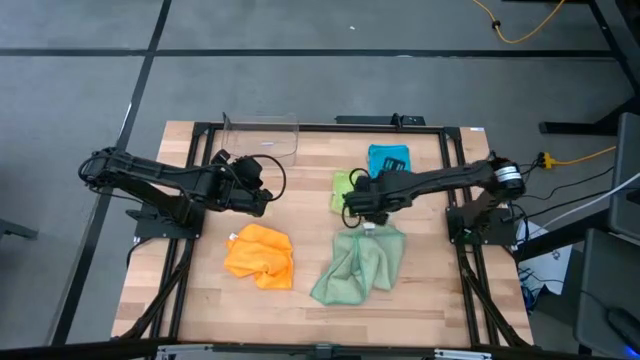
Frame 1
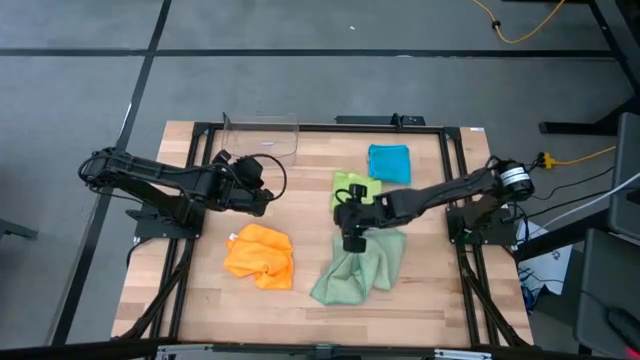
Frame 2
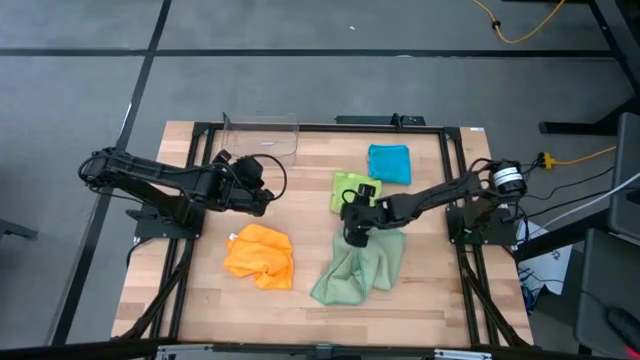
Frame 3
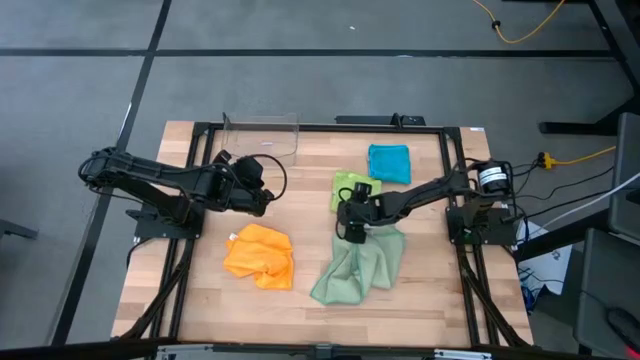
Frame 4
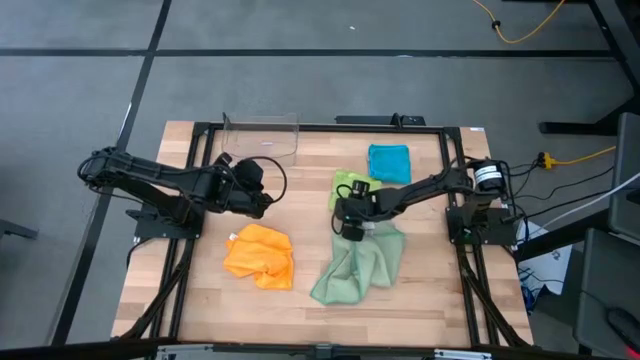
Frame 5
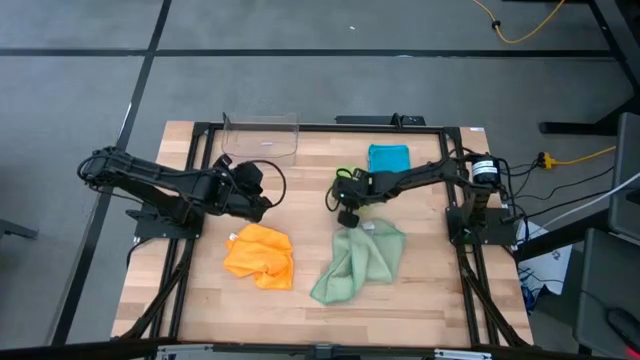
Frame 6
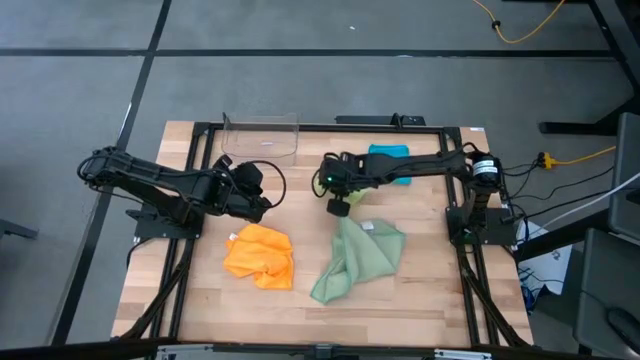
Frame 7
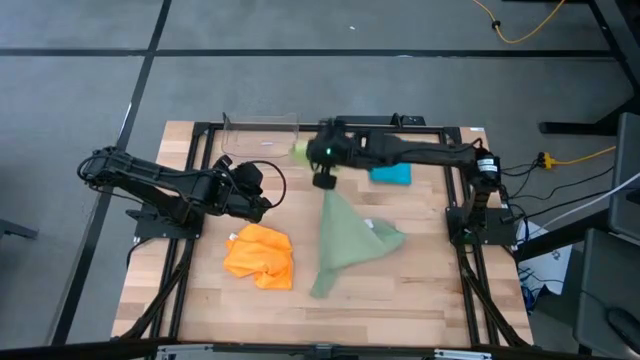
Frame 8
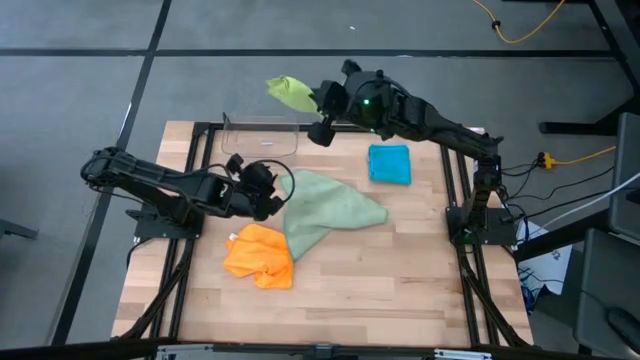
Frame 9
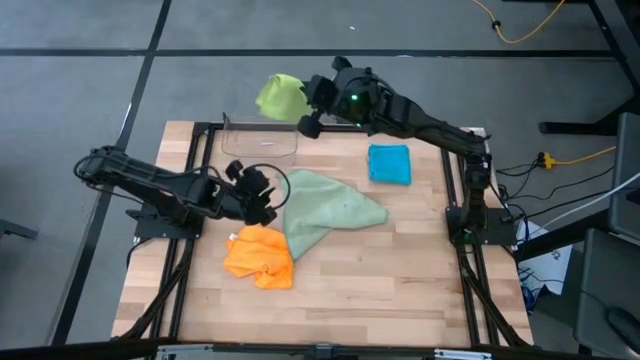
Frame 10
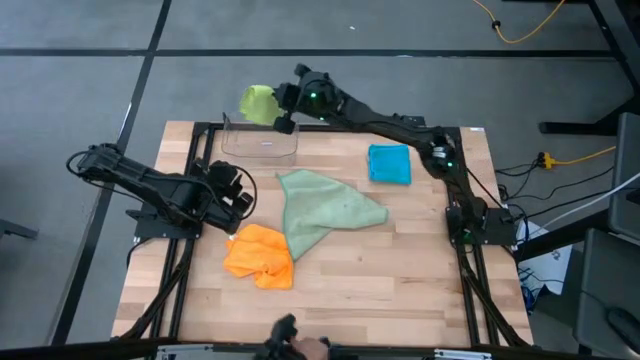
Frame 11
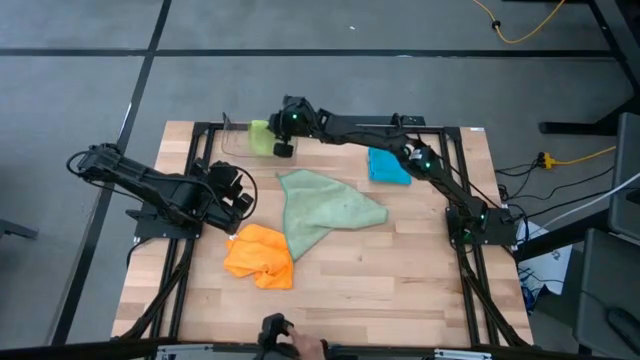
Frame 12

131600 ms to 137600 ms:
Task: Fold microfiber towels
Put the light green towel into the transparent bin

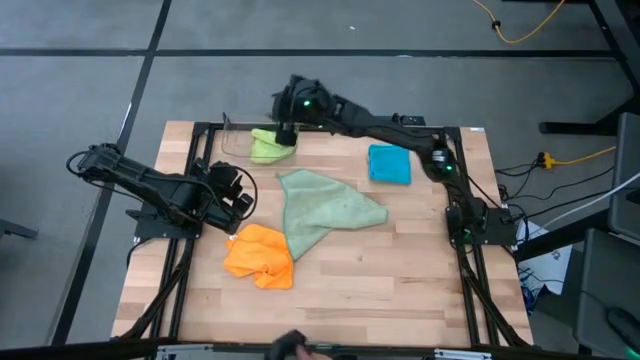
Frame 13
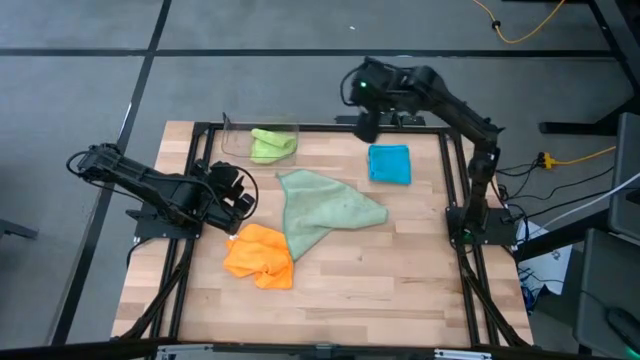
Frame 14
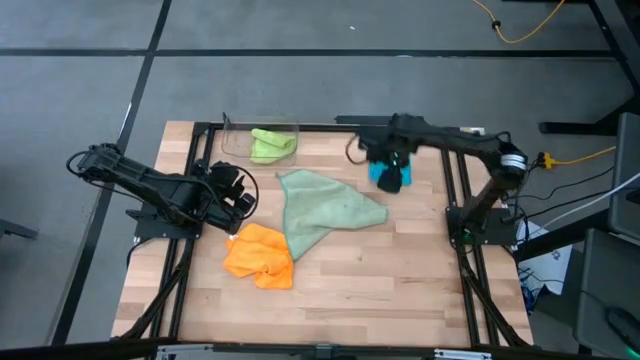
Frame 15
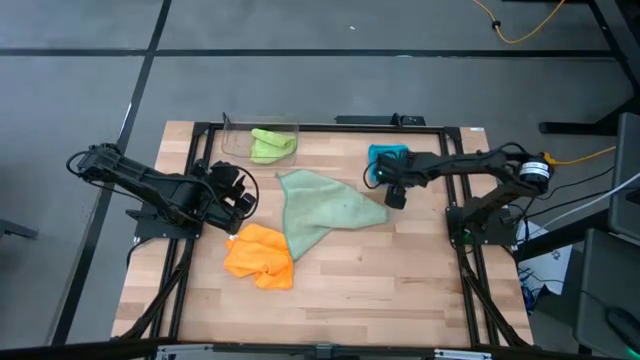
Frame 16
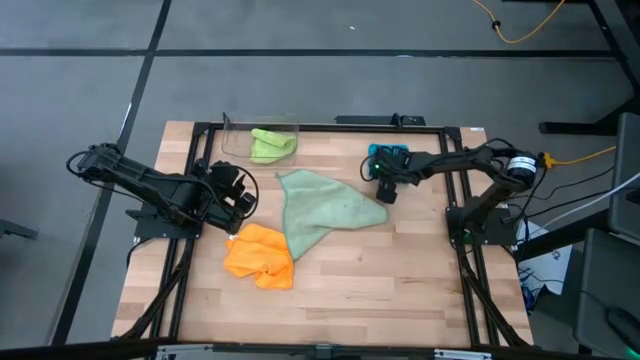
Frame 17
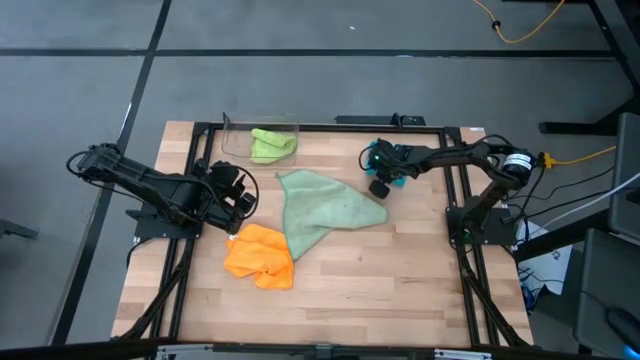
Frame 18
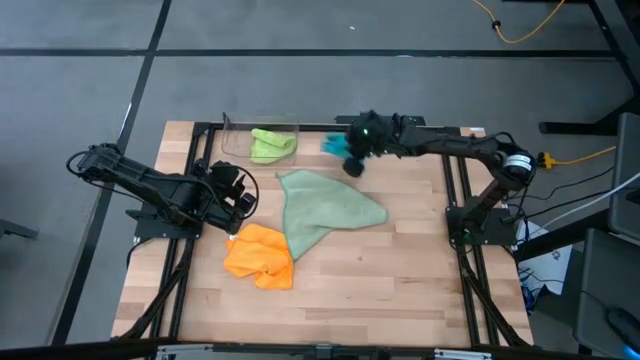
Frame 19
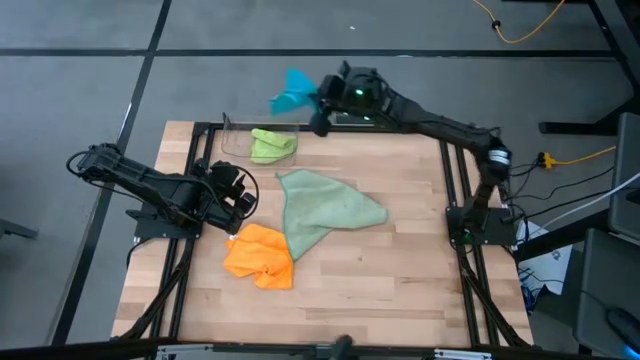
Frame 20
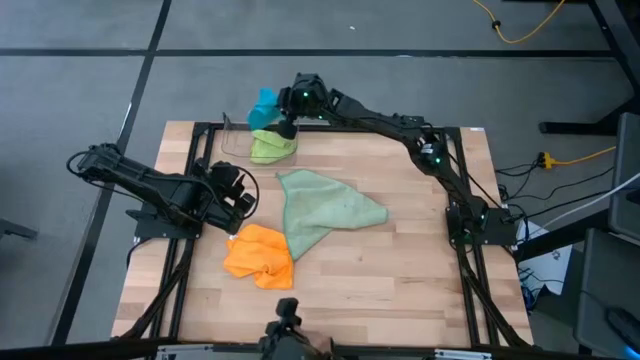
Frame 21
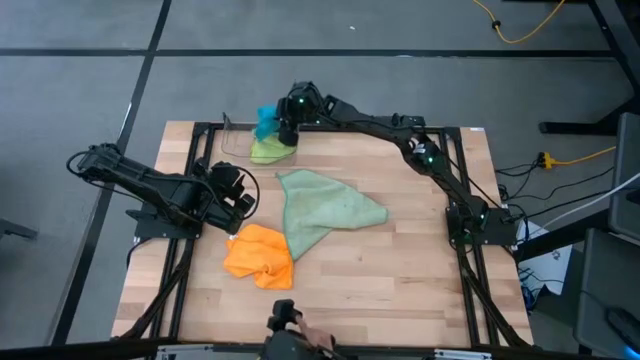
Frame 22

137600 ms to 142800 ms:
Put the blue towel into the transparent bin

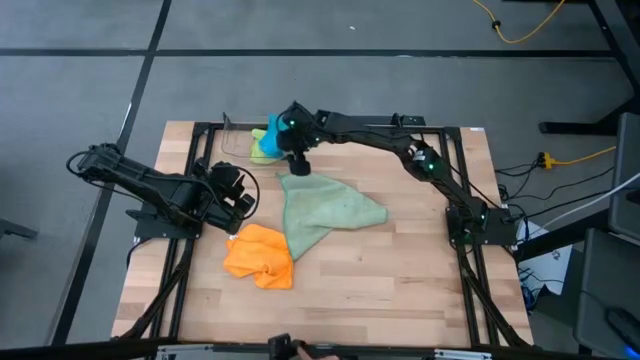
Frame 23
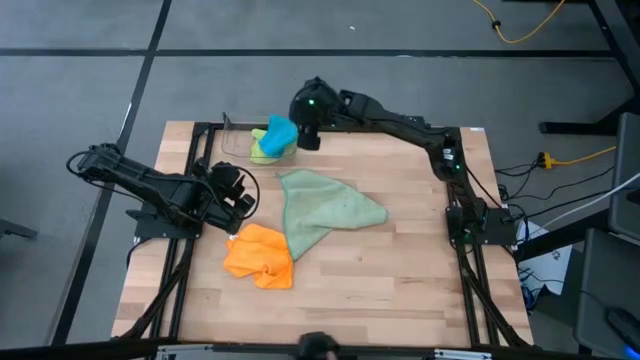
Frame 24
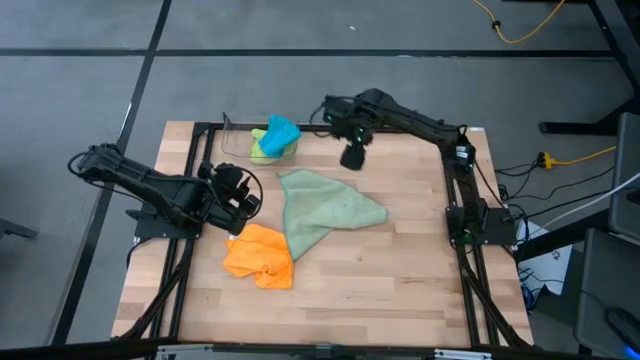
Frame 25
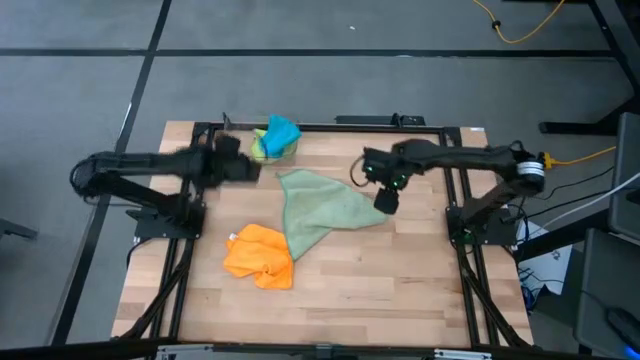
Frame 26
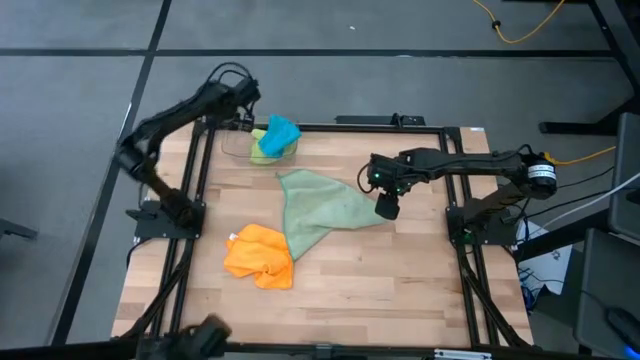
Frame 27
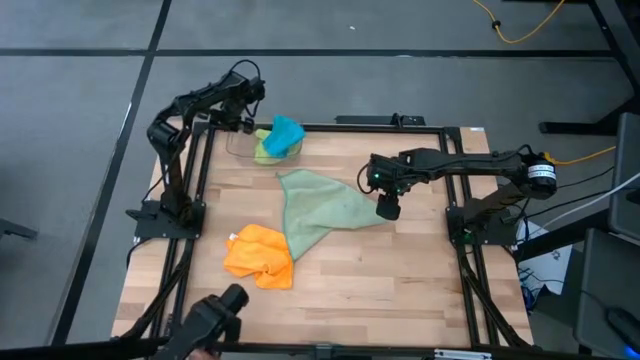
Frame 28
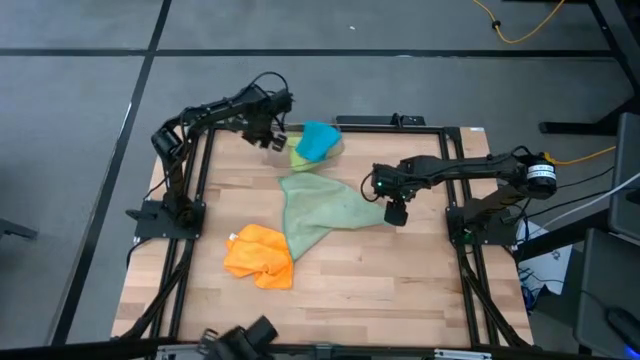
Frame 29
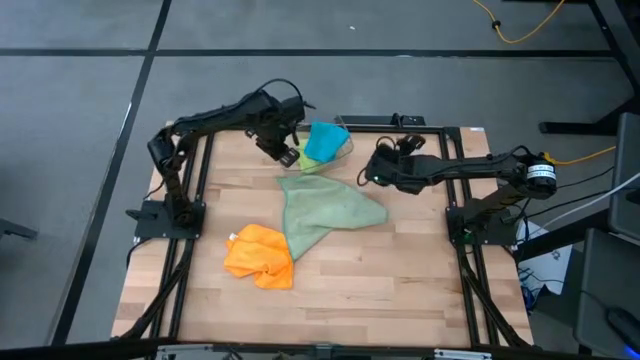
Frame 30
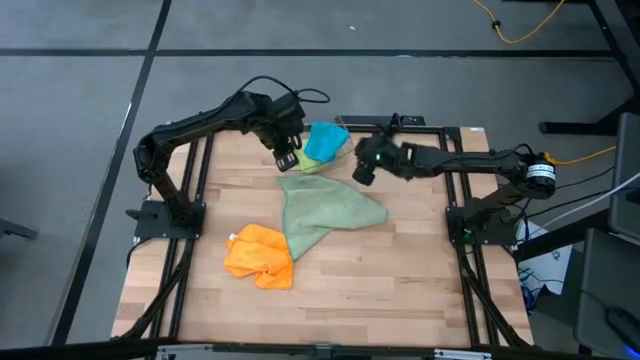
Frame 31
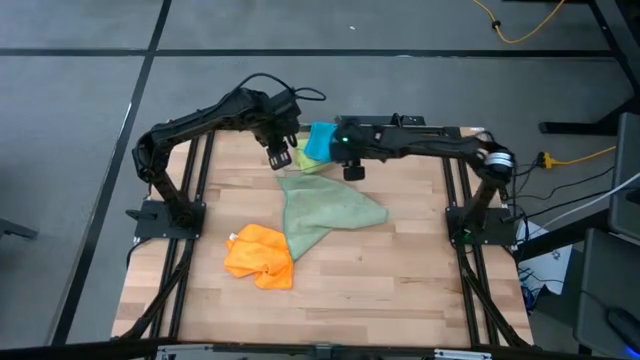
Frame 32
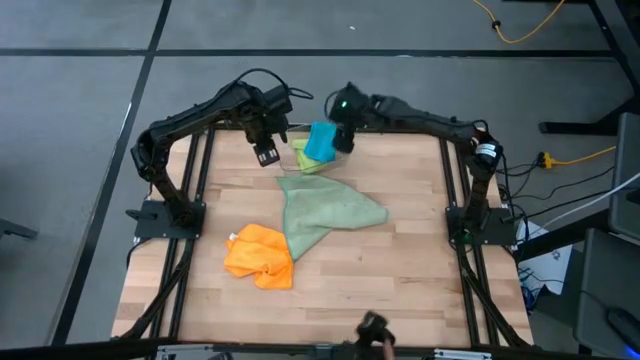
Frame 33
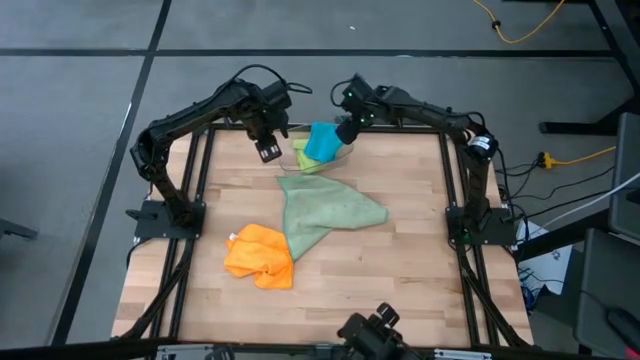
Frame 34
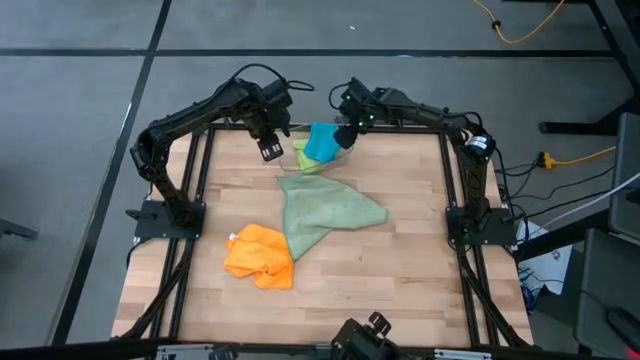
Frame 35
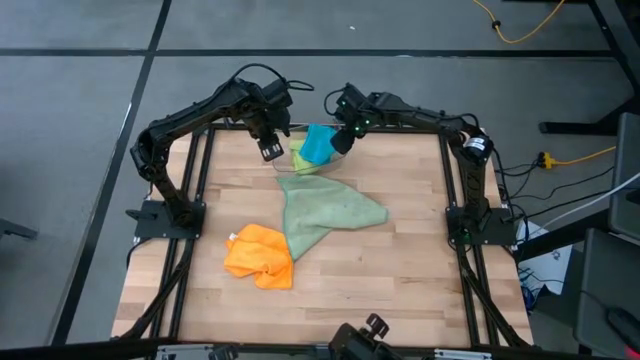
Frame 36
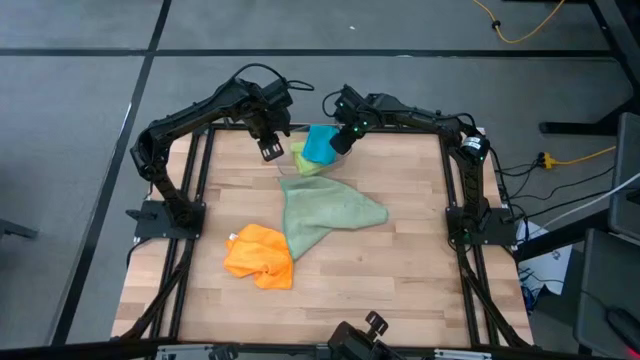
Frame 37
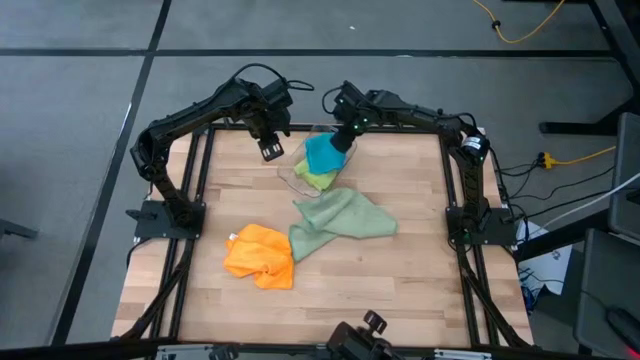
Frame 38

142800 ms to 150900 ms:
Adjust the transparent bin

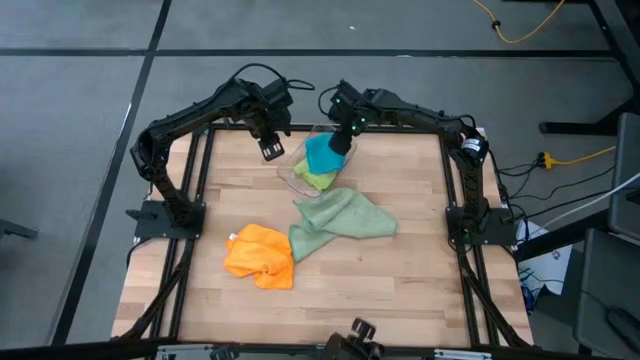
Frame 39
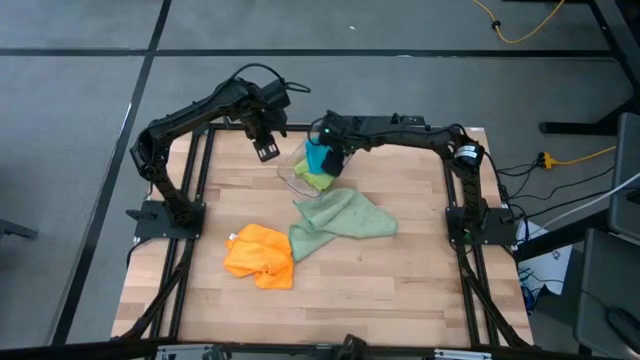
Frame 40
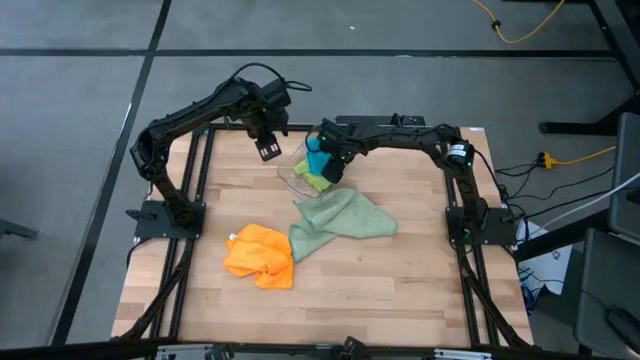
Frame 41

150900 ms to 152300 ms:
Adjust the blue towel

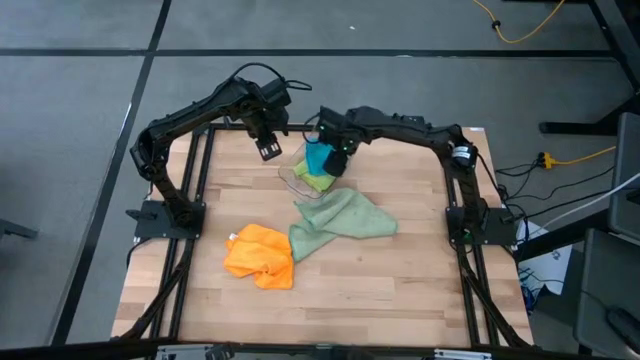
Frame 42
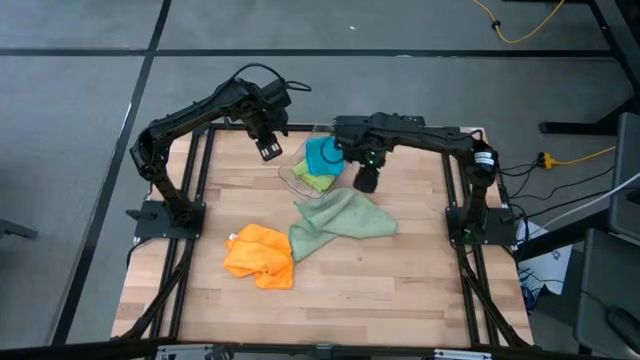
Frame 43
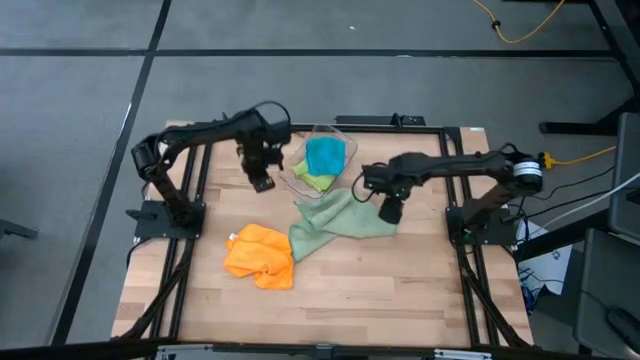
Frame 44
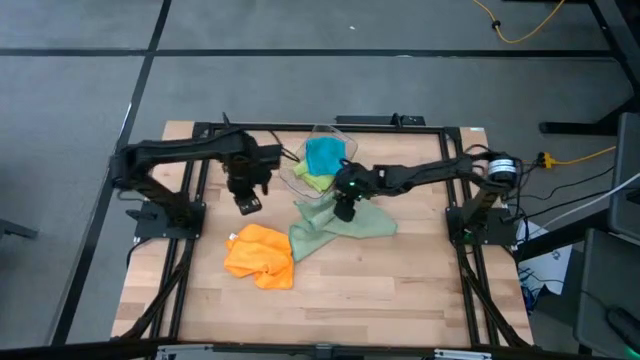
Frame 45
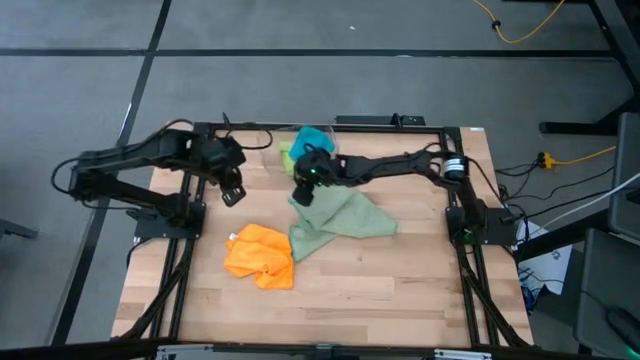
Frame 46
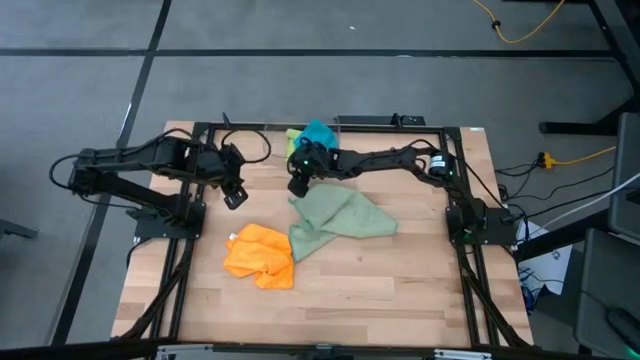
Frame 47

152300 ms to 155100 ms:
Adjust the transparent bin
